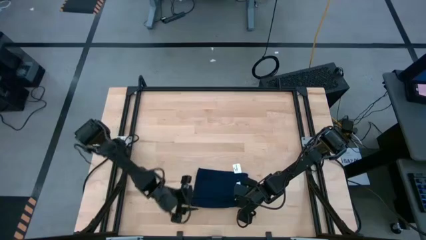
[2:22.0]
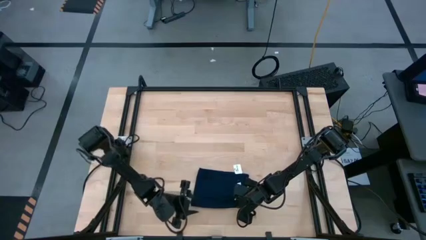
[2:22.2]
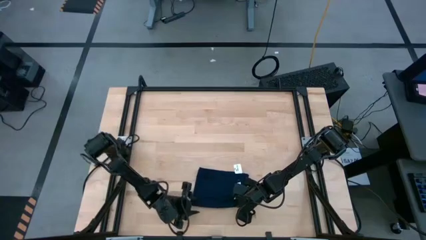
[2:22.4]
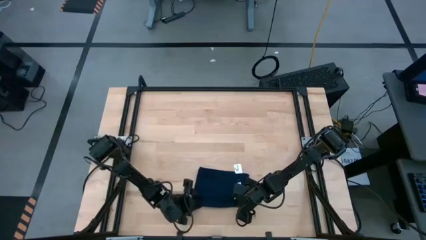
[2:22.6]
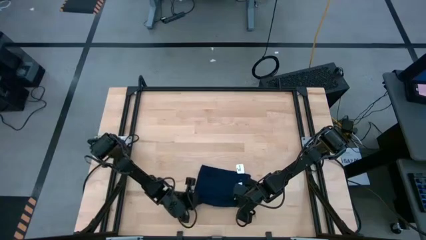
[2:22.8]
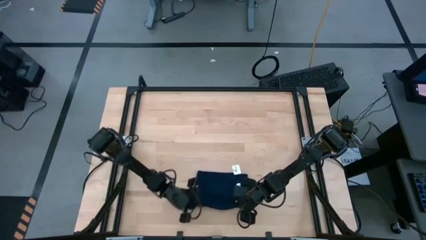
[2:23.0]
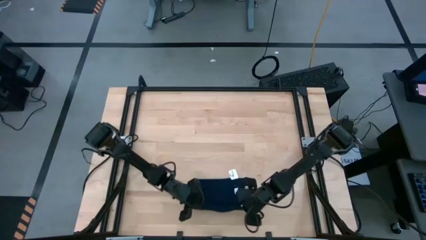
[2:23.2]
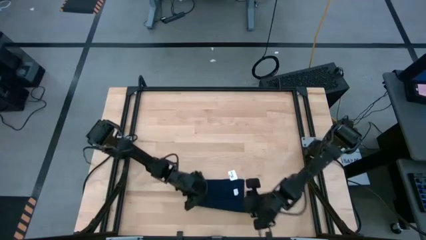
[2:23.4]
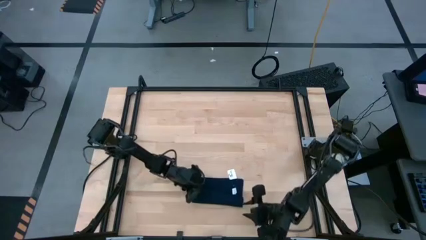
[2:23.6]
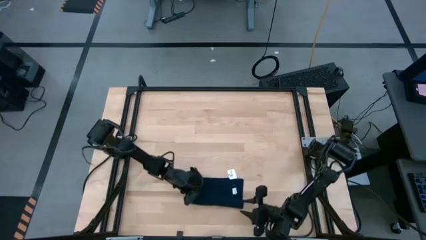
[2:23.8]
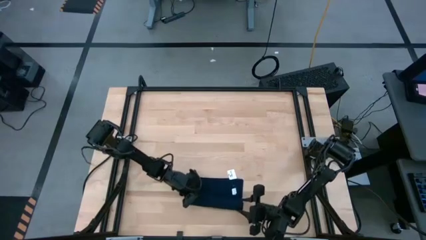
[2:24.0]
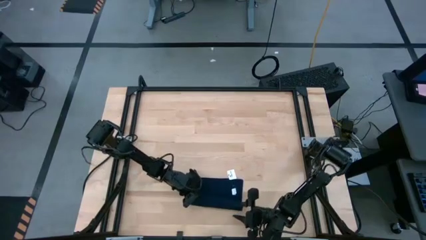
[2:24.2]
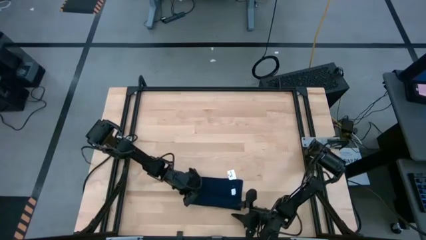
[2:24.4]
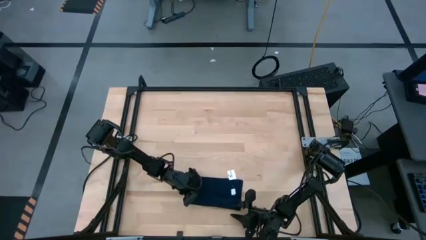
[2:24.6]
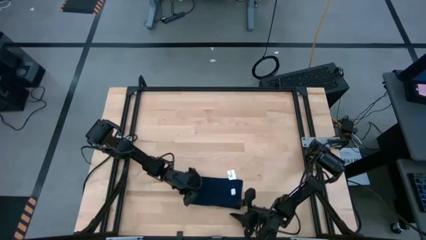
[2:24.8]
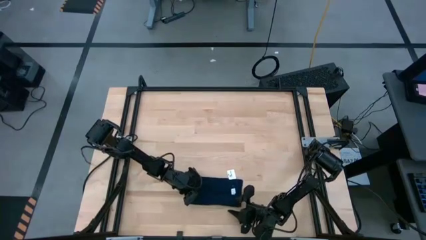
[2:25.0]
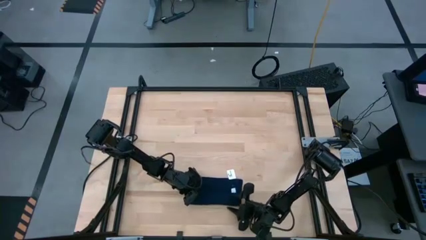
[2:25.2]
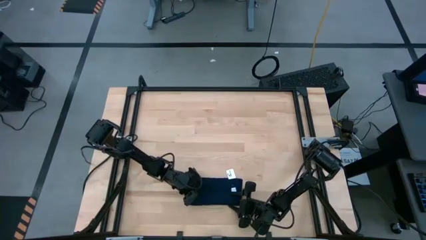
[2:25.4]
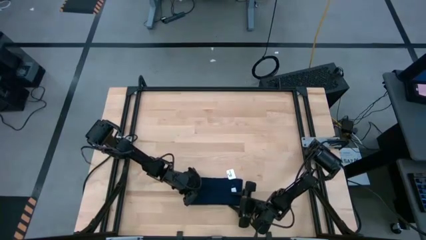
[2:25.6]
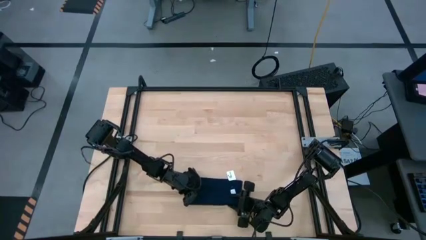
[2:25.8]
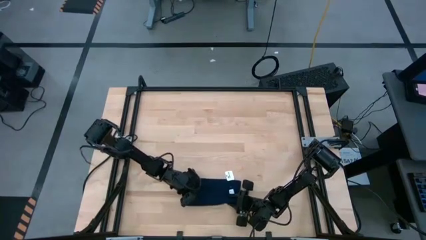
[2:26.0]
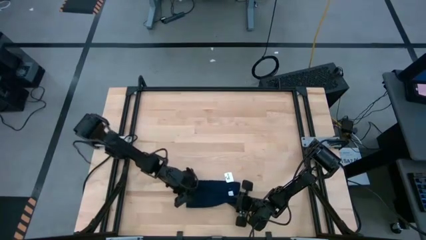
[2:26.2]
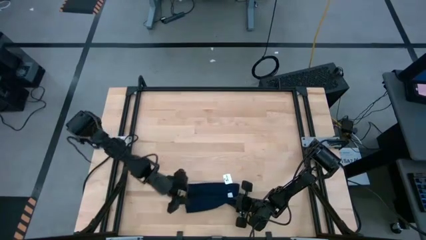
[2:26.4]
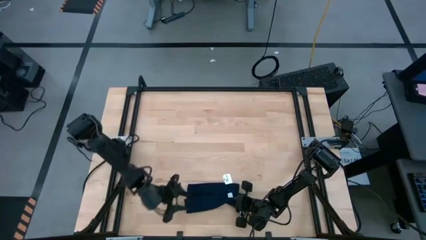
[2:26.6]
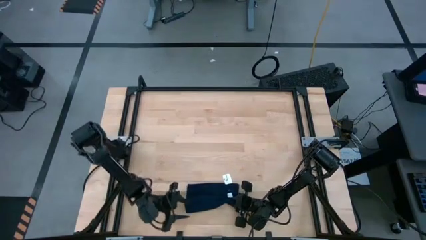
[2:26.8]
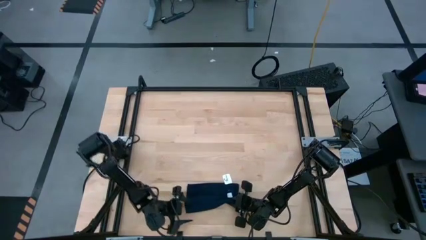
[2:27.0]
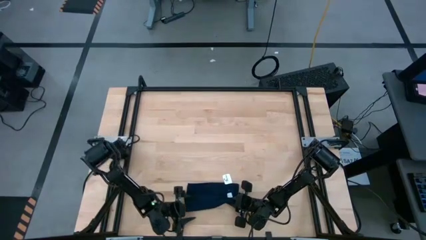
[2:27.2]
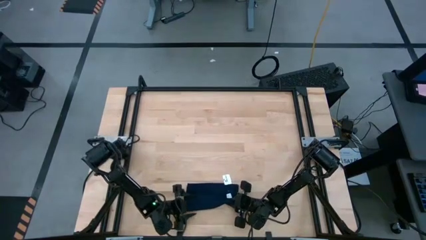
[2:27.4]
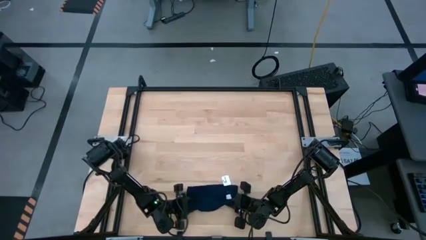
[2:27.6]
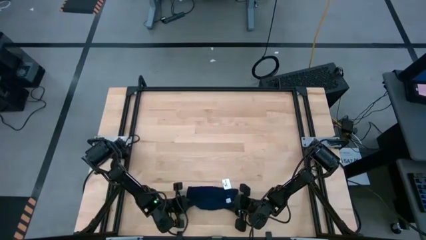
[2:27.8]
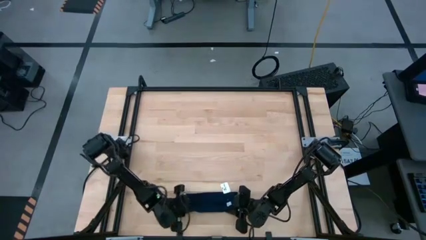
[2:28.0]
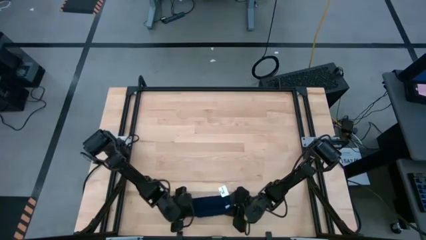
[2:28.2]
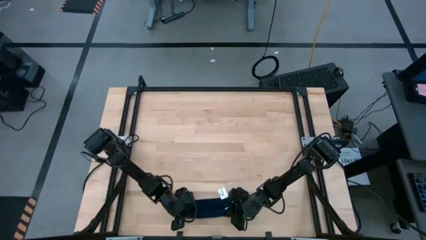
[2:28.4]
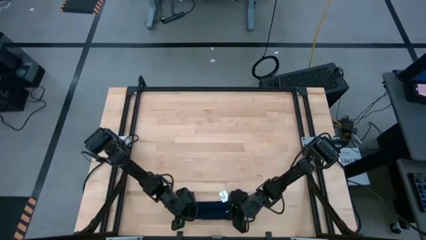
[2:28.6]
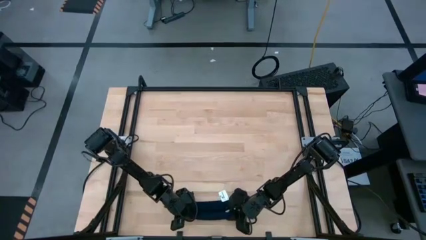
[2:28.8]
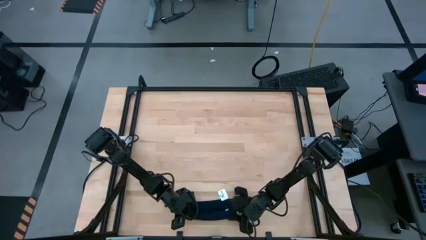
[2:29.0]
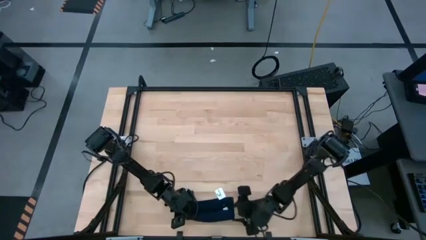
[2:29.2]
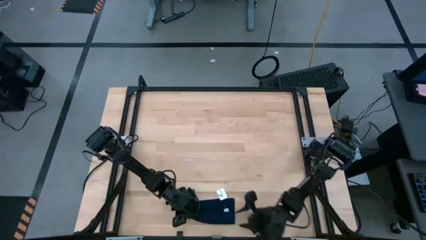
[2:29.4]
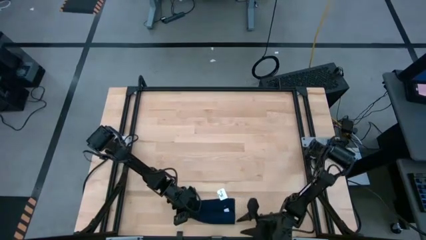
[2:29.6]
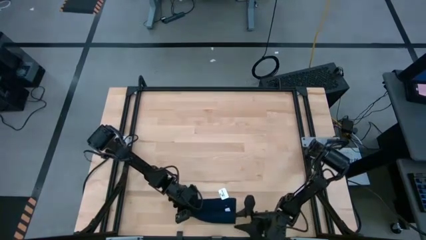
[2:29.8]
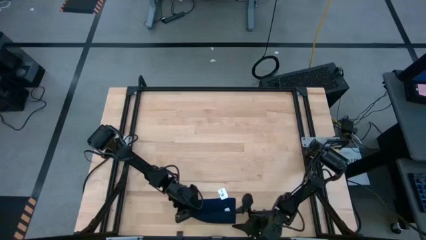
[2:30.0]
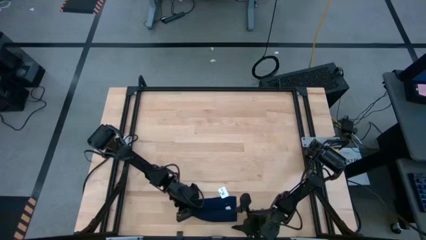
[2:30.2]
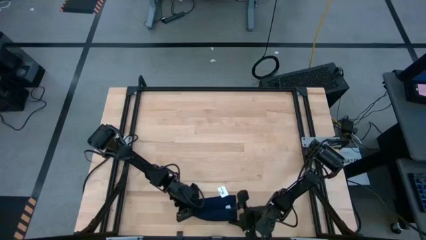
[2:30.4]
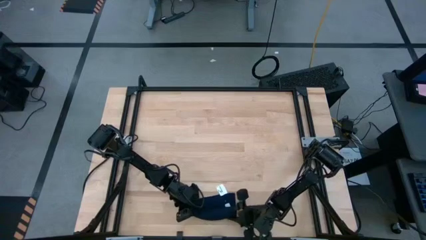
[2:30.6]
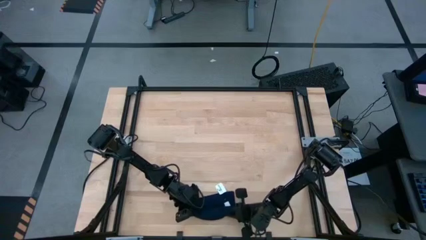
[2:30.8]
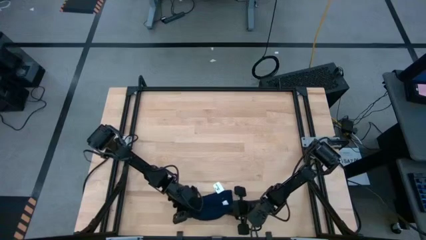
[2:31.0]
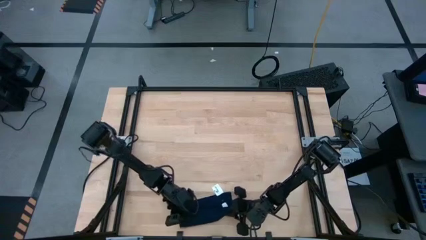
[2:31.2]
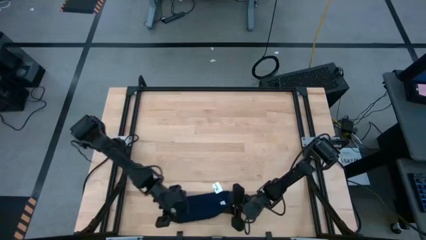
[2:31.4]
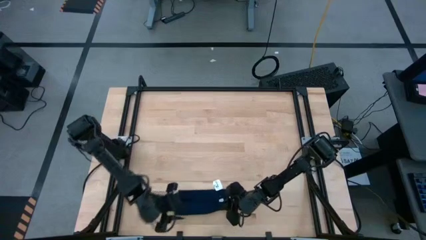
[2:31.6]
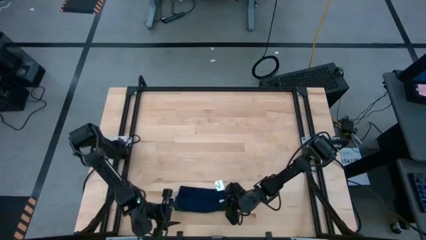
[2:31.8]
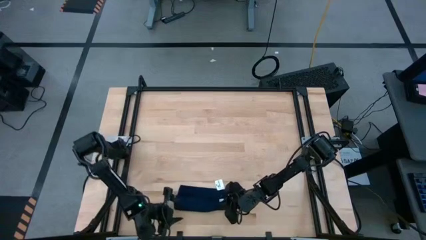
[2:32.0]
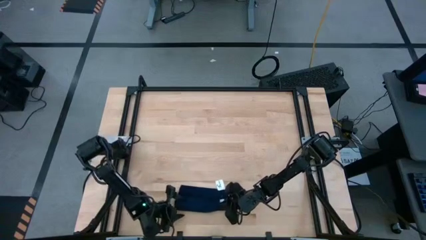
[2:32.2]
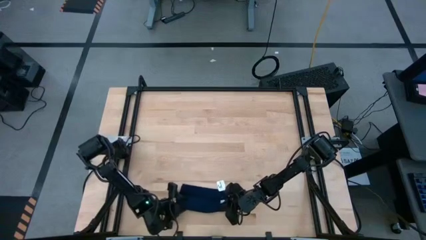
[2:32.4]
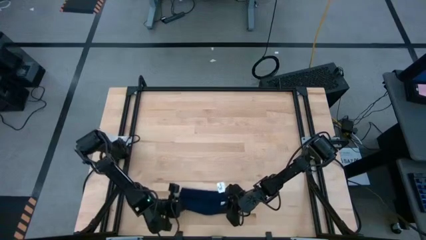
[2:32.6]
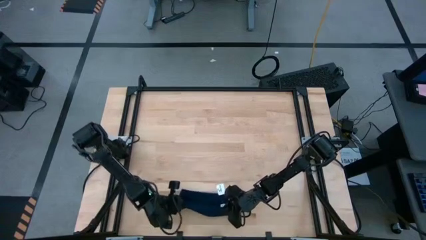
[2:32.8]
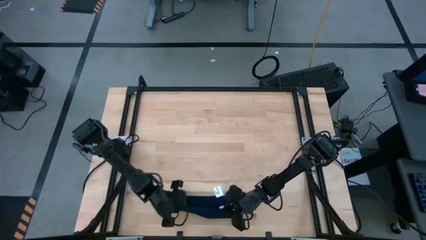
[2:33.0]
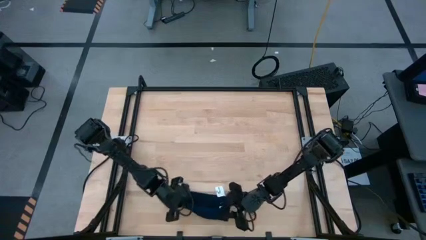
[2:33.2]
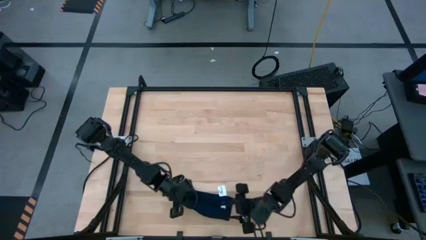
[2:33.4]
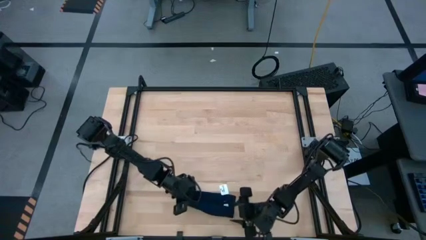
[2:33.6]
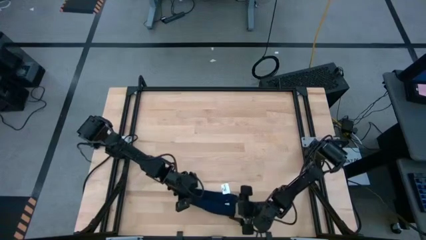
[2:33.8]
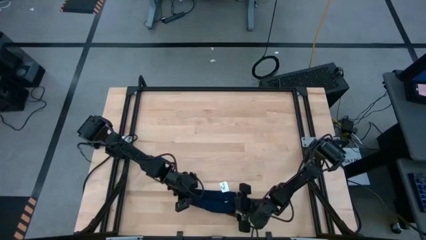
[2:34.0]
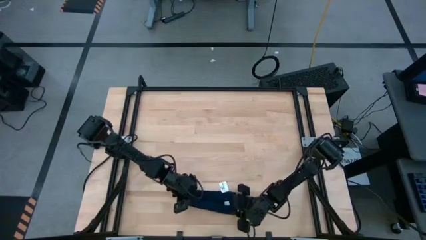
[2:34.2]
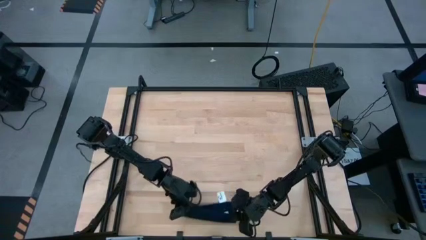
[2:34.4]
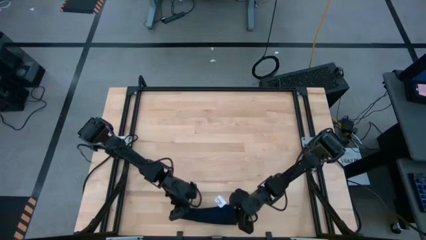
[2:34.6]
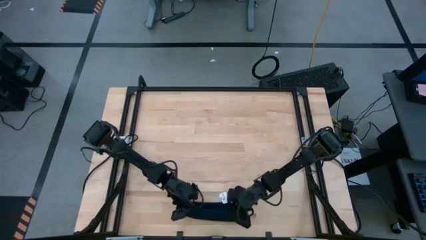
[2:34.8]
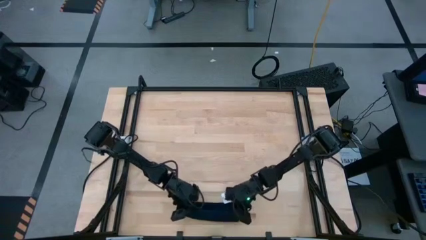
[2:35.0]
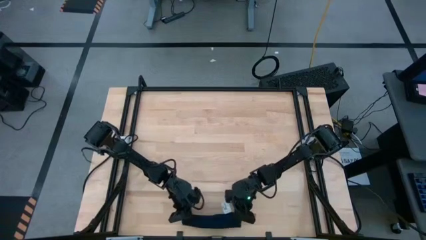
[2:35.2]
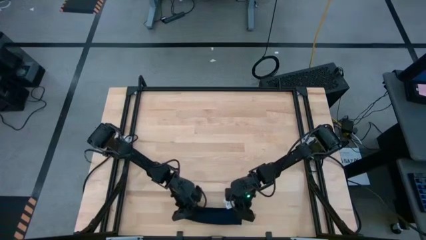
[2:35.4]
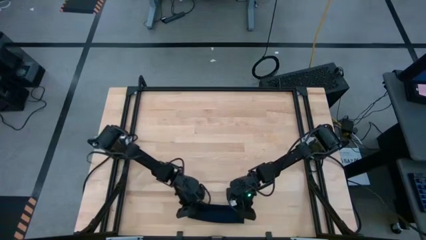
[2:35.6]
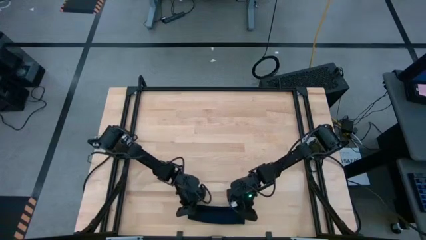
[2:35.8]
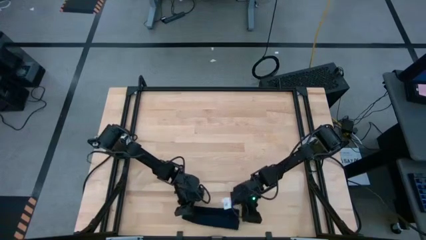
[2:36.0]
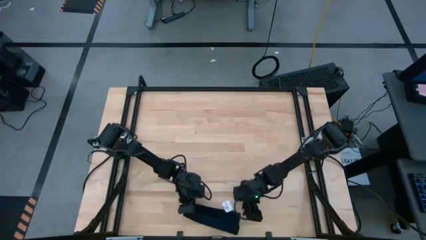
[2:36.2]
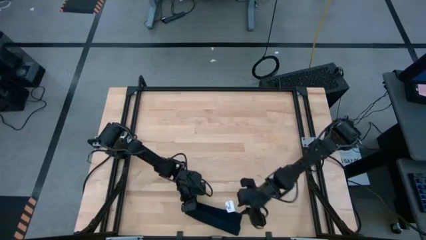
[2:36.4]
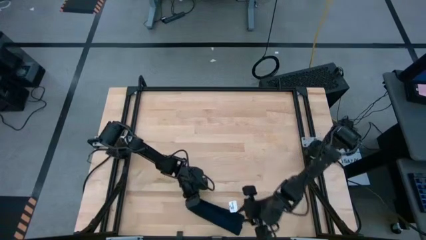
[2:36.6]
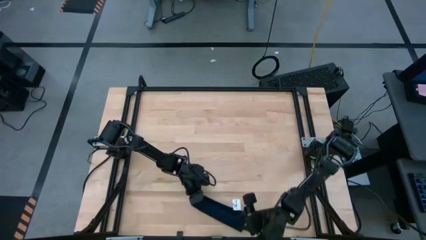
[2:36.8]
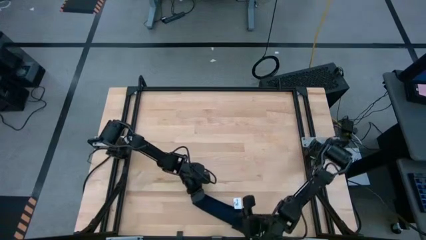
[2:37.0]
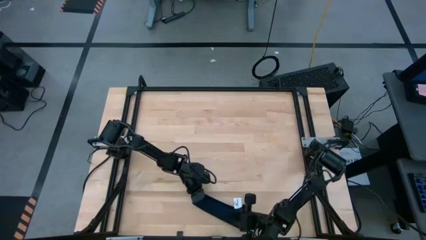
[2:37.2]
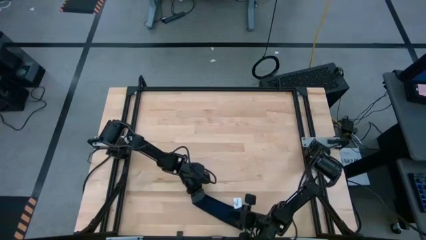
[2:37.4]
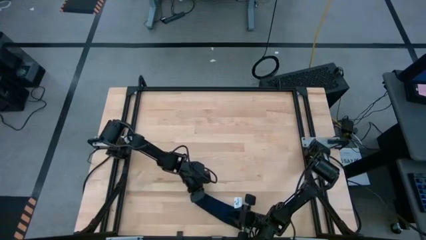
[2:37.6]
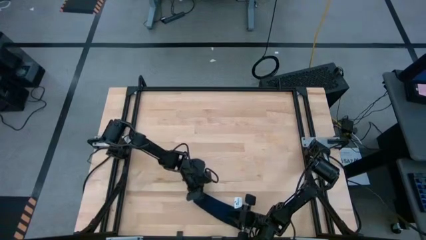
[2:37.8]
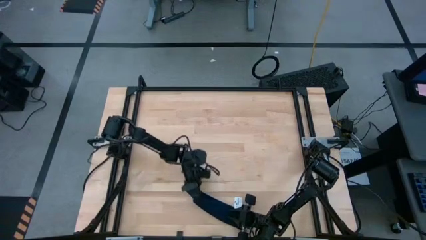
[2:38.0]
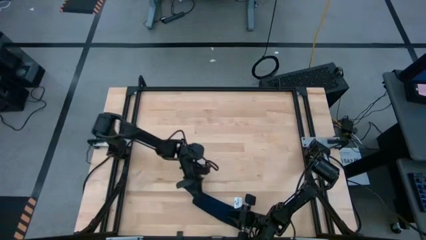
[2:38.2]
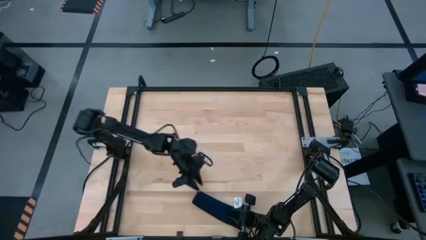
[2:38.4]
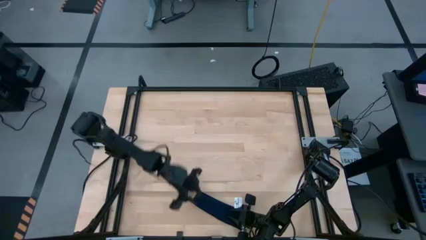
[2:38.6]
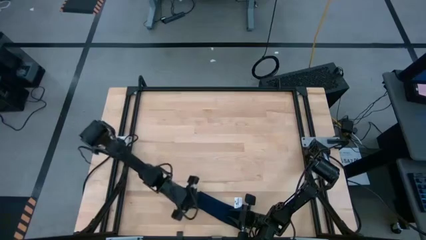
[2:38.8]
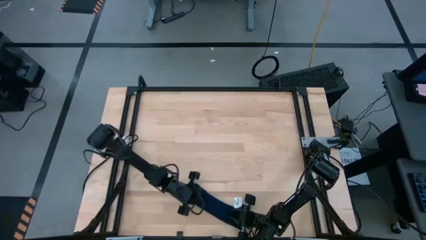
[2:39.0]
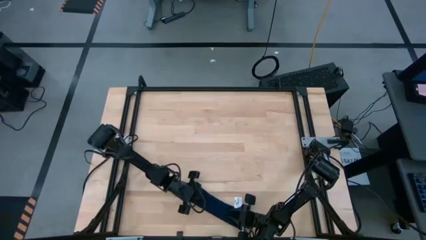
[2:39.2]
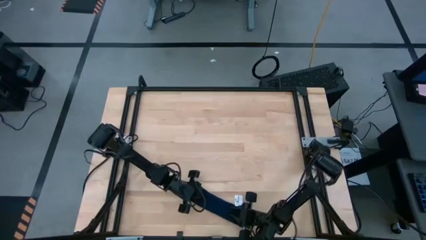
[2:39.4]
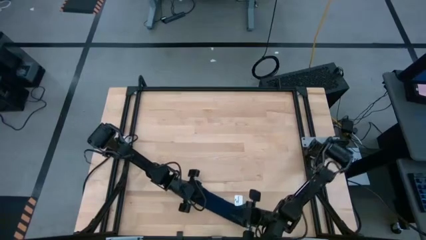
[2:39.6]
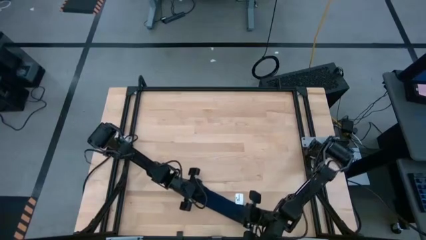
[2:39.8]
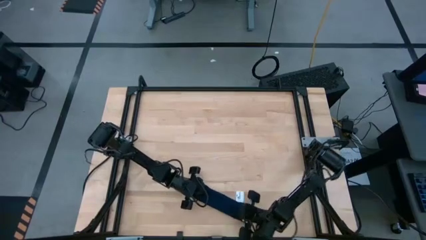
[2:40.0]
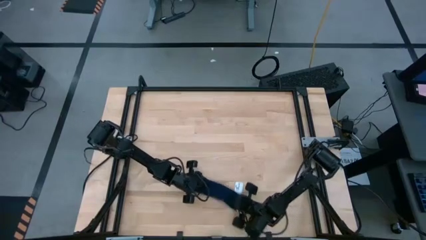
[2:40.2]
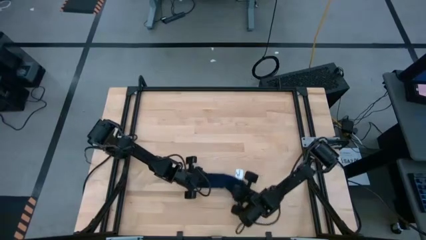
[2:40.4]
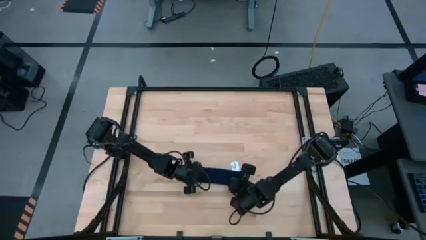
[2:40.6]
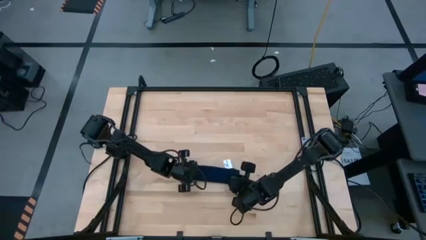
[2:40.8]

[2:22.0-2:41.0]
Task: Roll towel into tight, uniform cylinder
Roll the blue cloth napkin
